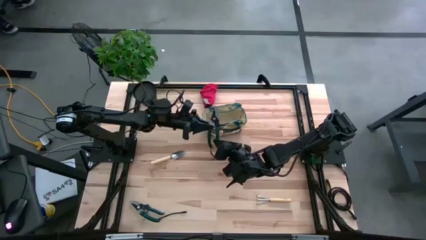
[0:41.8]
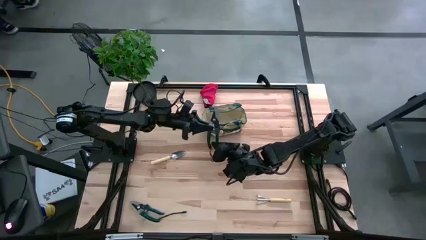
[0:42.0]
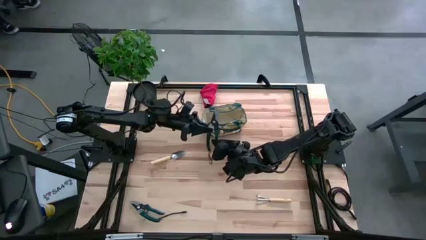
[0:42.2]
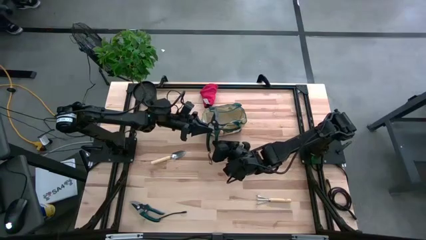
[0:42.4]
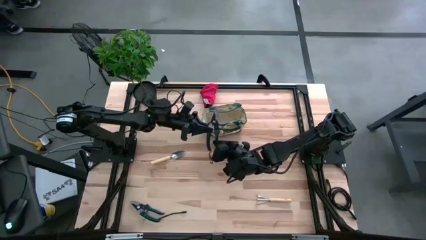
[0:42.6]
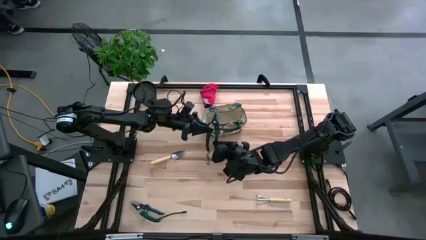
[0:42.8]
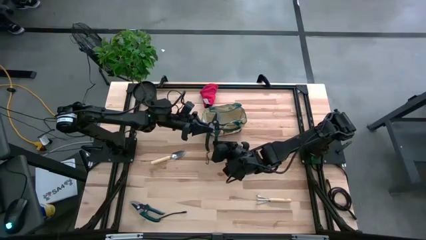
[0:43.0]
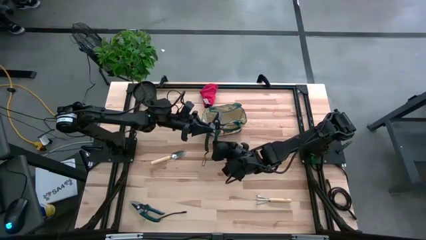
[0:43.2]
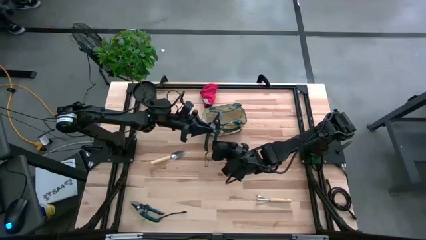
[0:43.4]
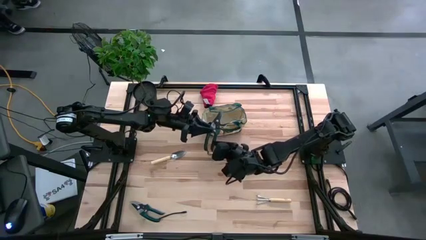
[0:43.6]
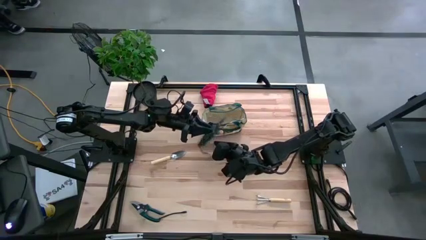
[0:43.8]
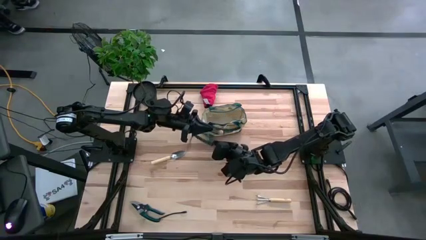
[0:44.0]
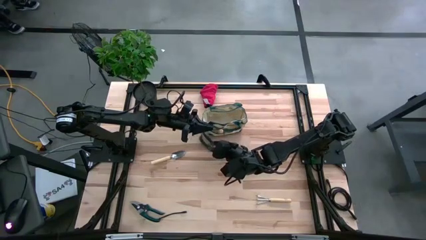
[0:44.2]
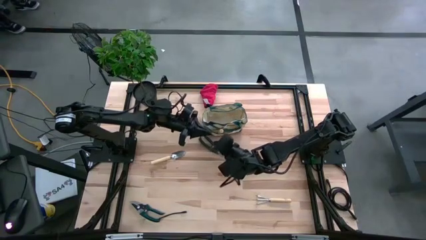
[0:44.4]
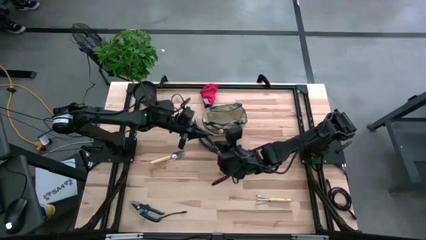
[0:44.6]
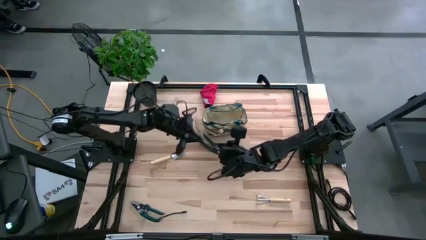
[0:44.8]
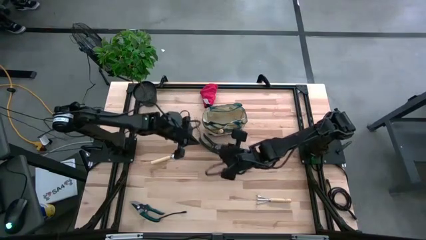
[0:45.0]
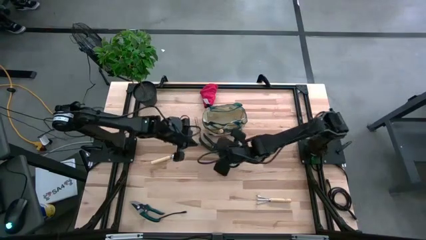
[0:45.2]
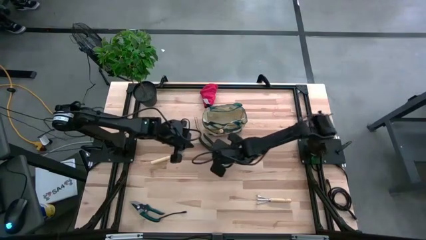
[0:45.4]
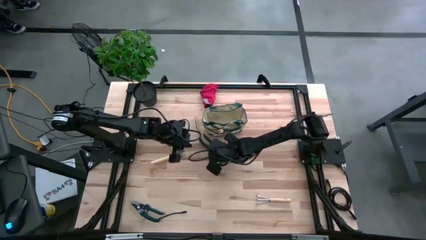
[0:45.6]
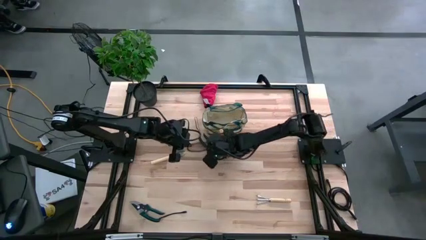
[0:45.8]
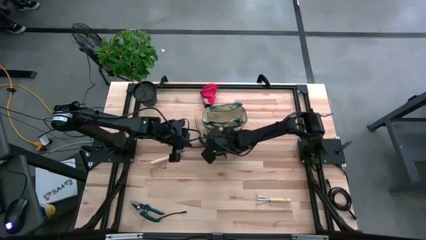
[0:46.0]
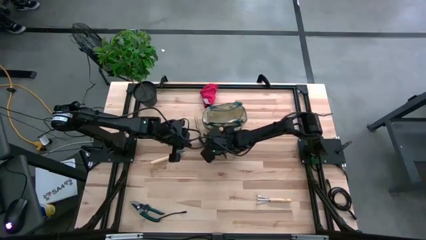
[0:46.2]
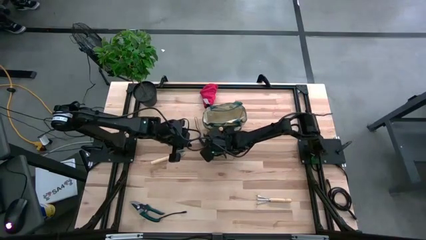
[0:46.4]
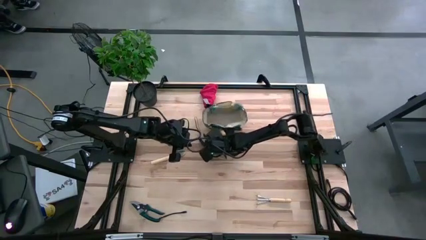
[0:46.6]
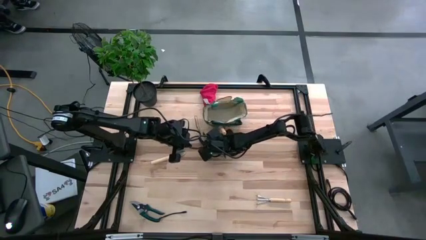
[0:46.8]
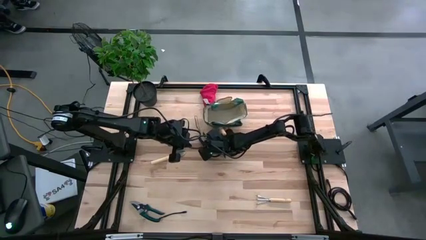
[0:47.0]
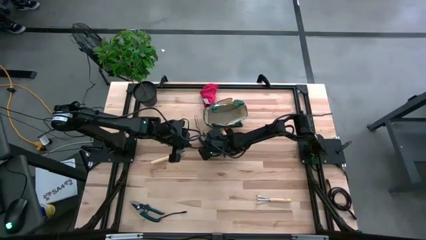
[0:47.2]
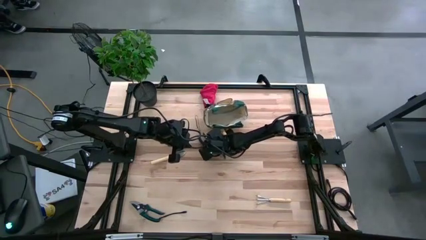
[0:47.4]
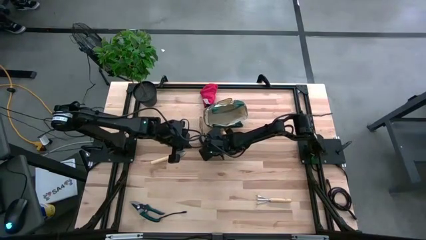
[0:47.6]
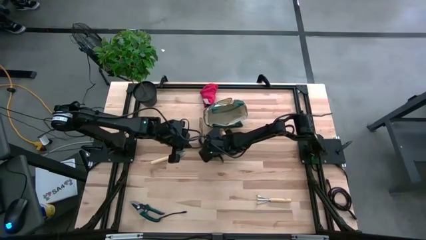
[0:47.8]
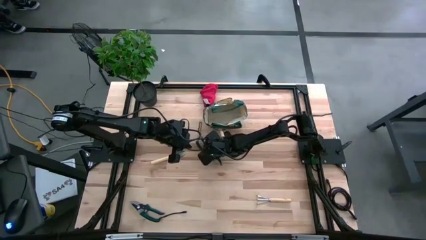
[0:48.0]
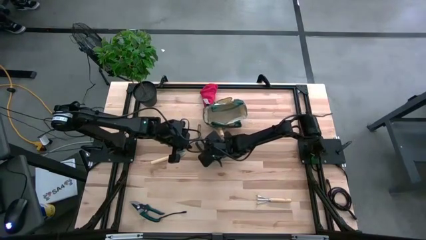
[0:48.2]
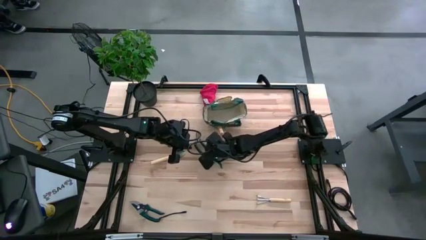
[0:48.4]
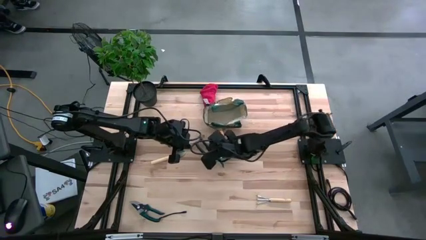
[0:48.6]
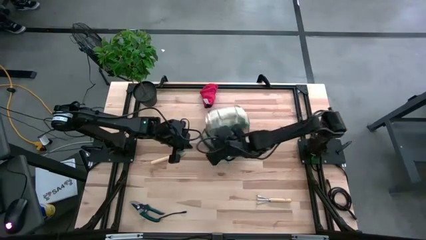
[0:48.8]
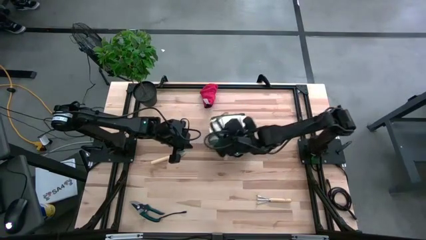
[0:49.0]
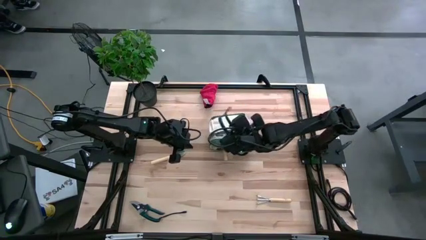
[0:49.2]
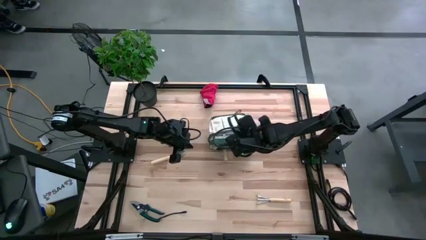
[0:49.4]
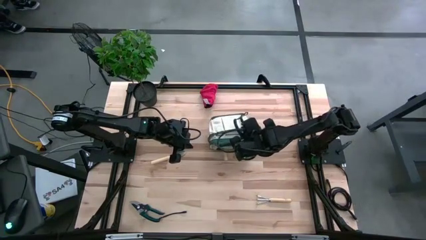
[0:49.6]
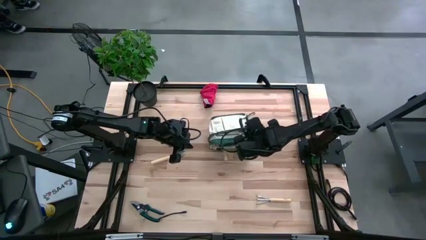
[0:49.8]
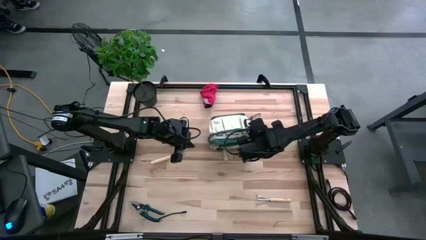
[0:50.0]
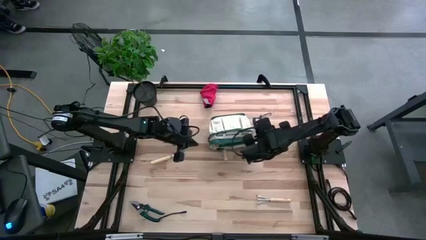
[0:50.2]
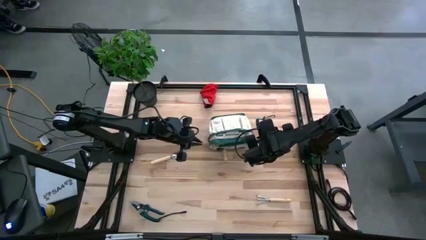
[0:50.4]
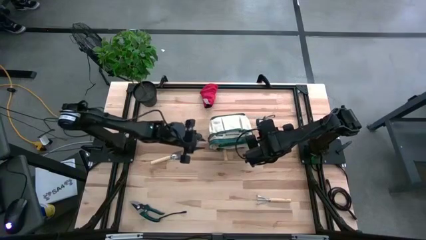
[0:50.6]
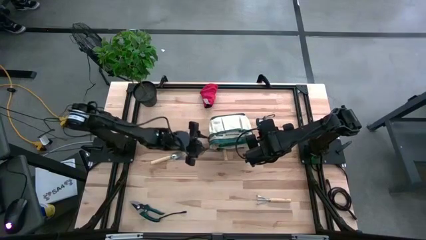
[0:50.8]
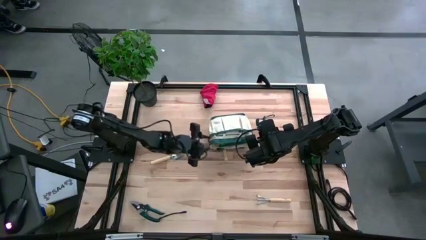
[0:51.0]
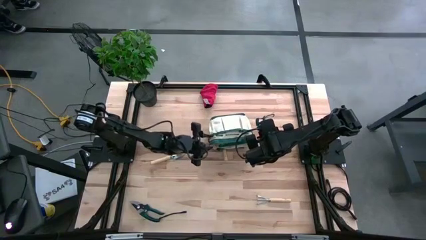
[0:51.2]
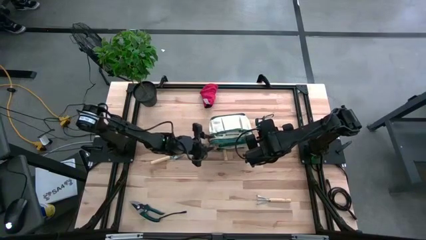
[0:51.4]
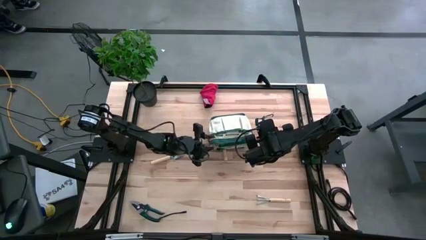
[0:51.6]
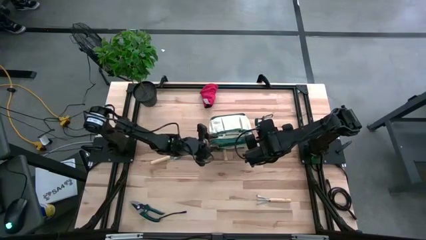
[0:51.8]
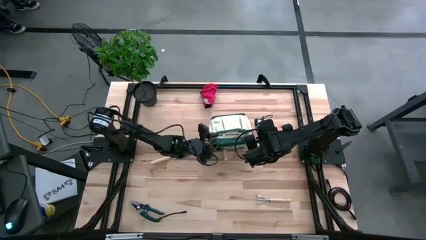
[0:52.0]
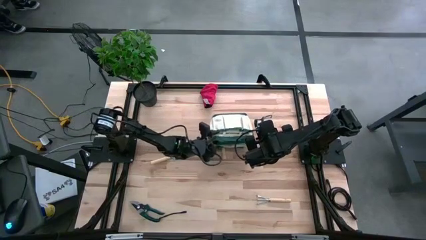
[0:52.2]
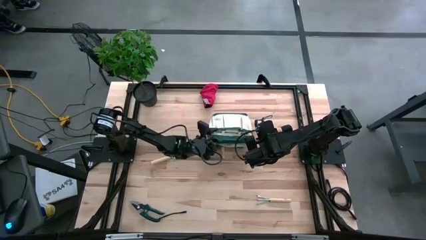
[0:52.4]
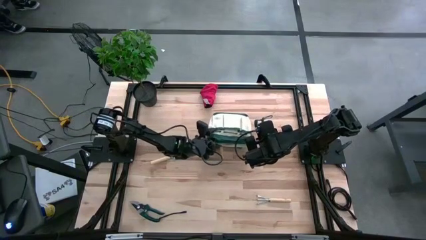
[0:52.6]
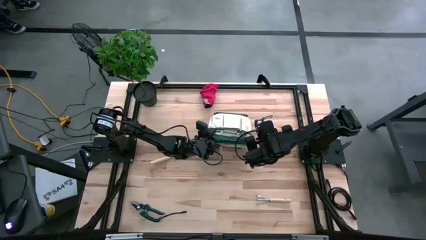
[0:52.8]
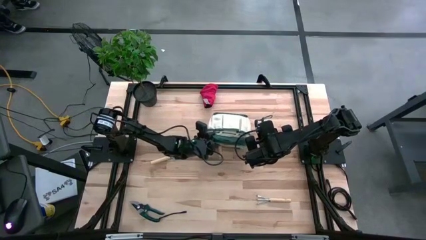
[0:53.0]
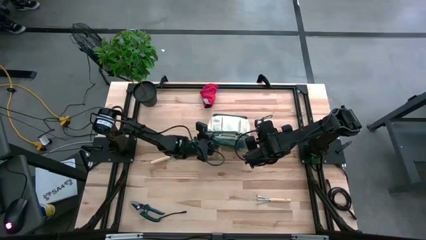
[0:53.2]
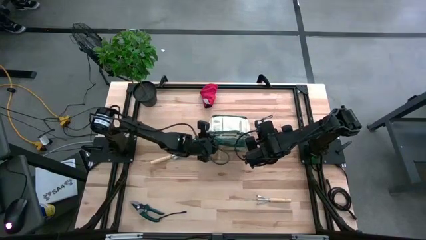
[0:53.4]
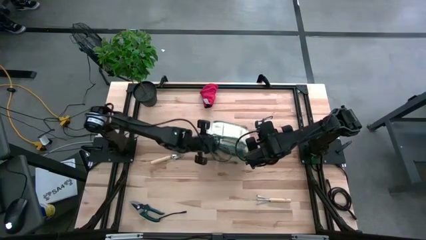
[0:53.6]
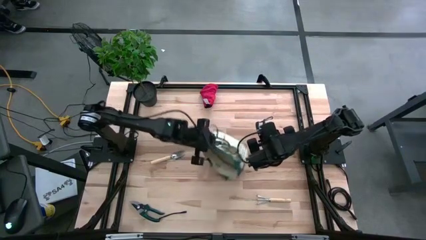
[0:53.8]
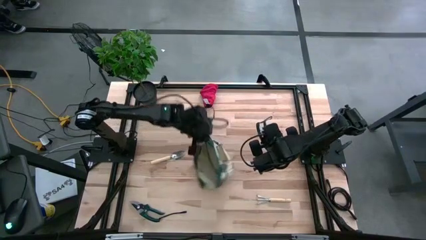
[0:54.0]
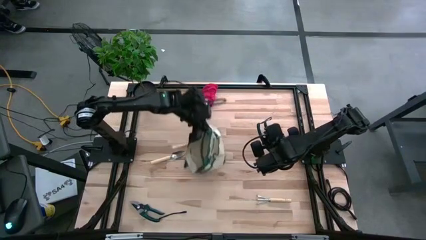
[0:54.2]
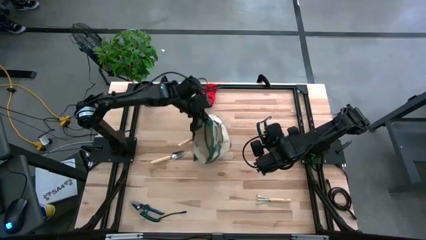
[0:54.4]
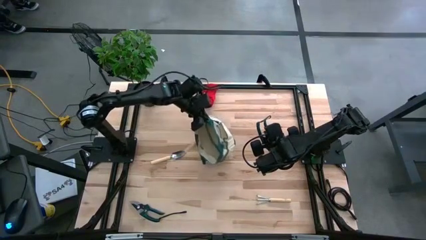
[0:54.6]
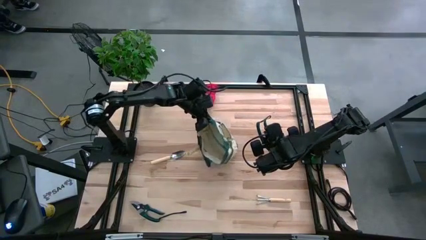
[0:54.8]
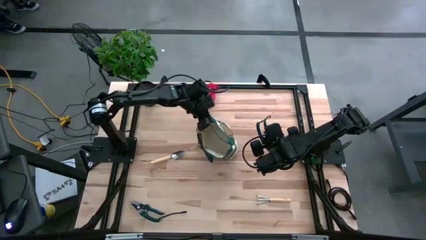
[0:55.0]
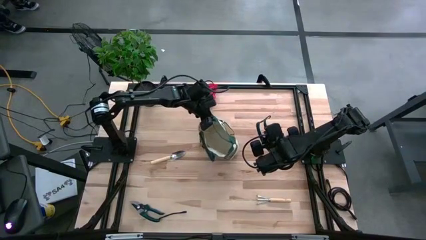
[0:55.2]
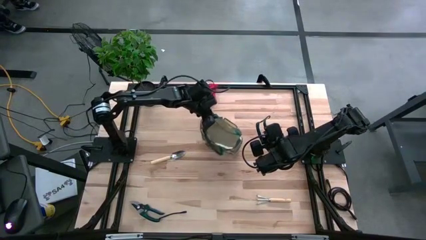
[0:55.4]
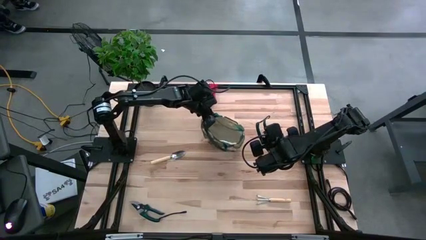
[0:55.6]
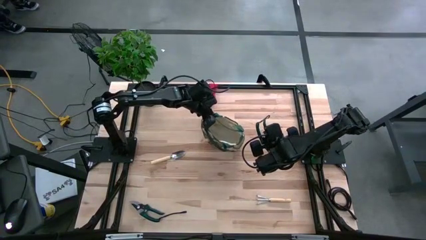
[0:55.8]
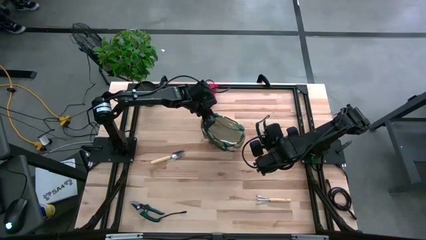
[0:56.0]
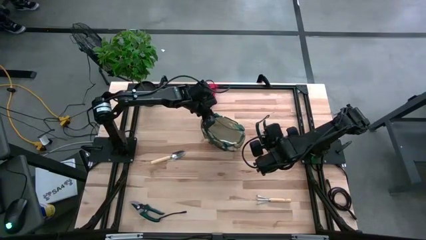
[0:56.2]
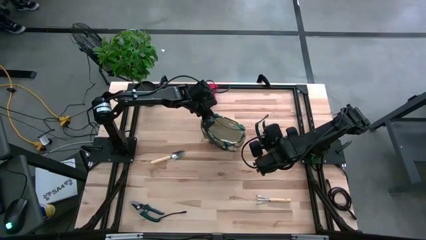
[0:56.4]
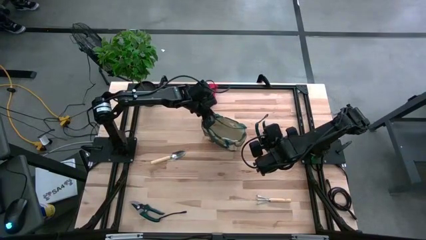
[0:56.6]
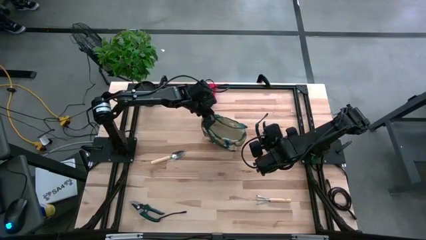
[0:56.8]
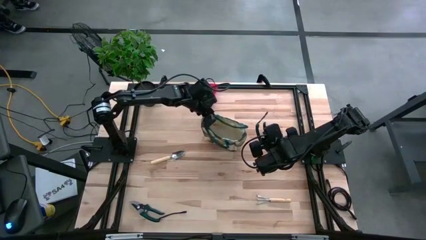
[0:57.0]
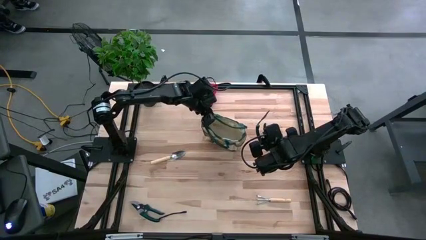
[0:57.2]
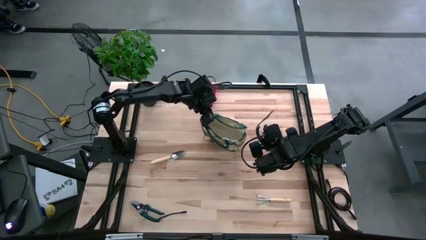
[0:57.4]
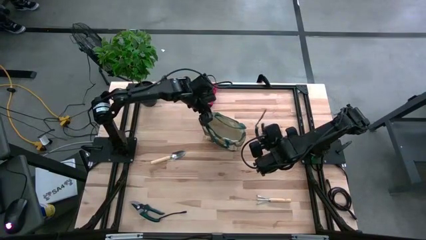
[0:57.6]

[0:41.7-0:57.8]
Task: Pick & Place Garden tools in Gardening bag
Put the top black shear scissor into the gardening bag
